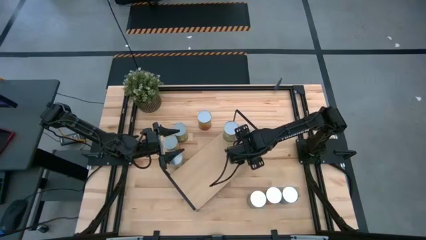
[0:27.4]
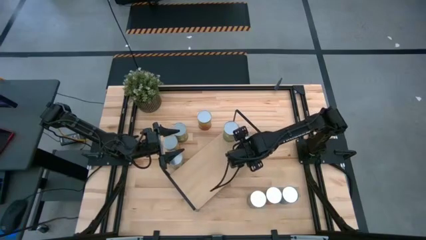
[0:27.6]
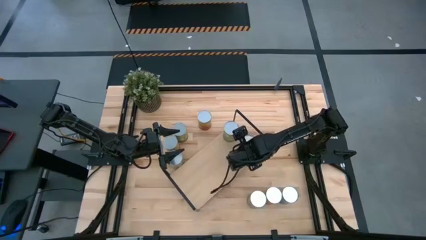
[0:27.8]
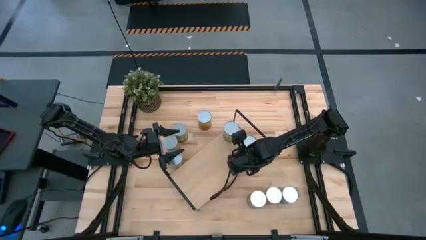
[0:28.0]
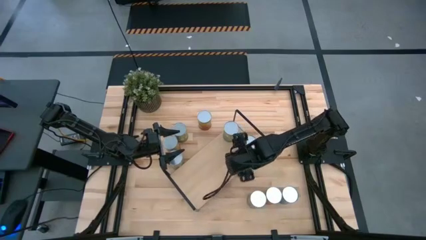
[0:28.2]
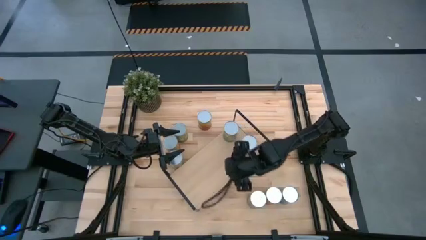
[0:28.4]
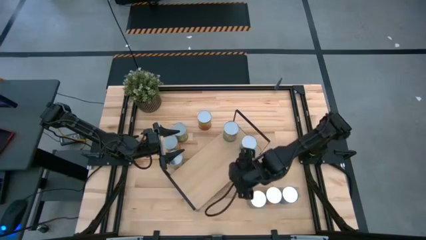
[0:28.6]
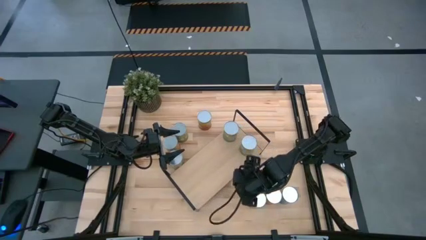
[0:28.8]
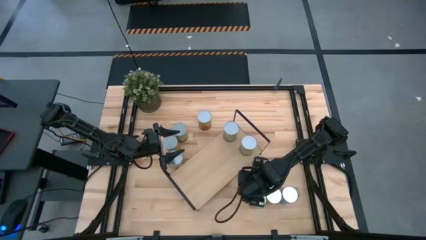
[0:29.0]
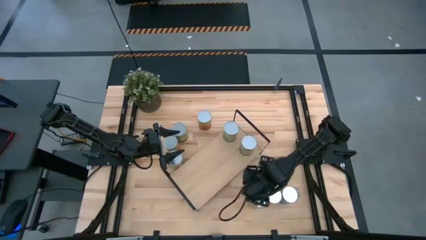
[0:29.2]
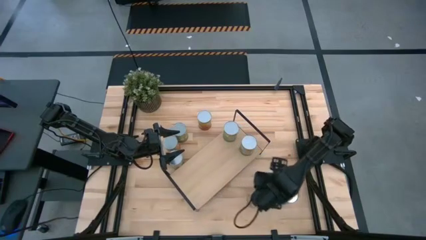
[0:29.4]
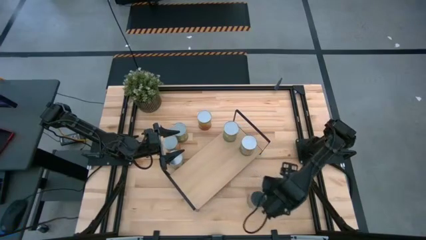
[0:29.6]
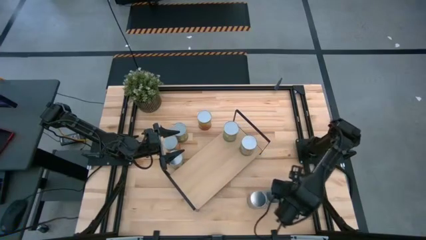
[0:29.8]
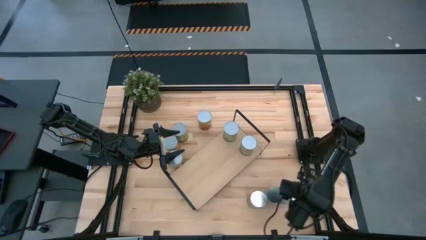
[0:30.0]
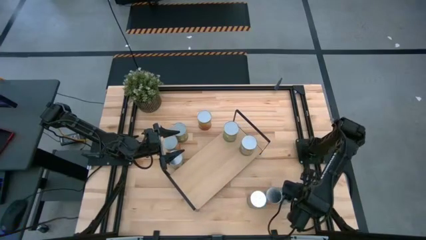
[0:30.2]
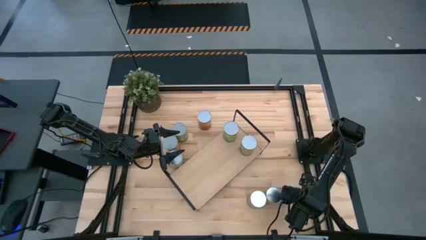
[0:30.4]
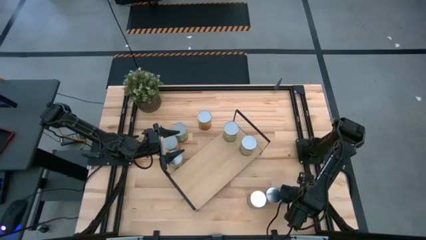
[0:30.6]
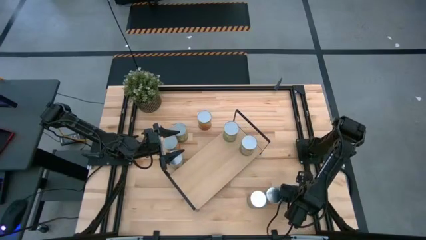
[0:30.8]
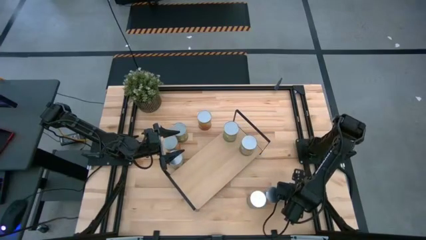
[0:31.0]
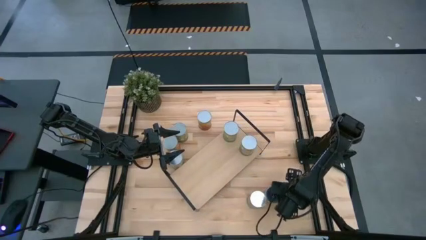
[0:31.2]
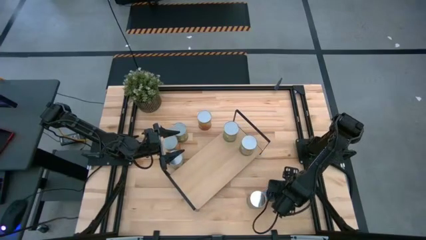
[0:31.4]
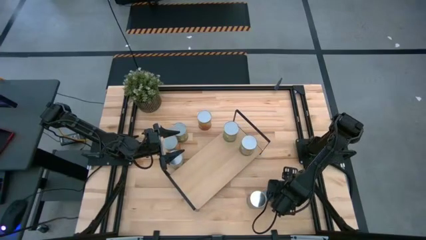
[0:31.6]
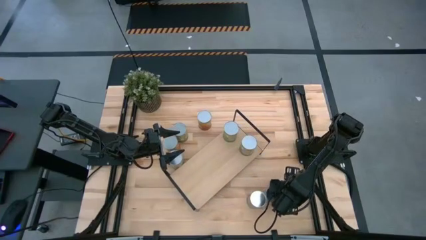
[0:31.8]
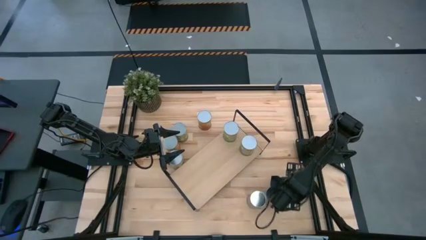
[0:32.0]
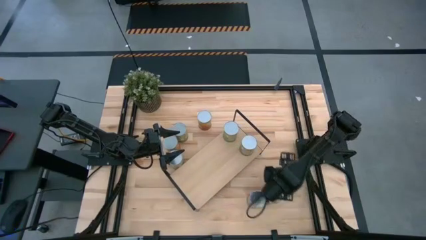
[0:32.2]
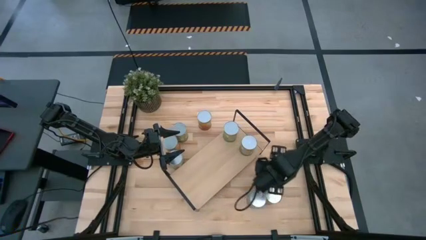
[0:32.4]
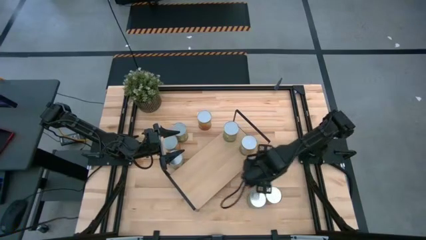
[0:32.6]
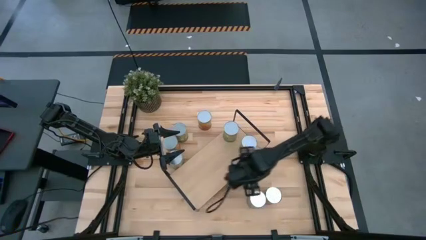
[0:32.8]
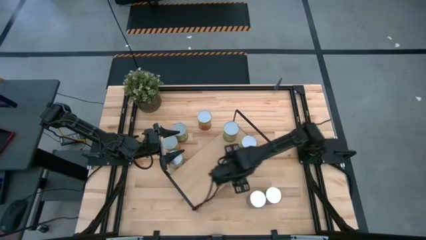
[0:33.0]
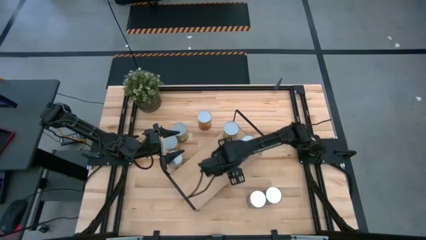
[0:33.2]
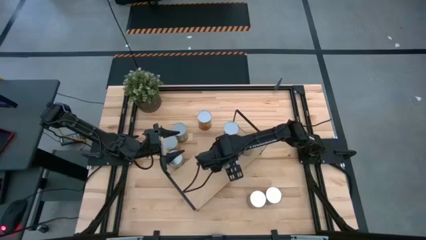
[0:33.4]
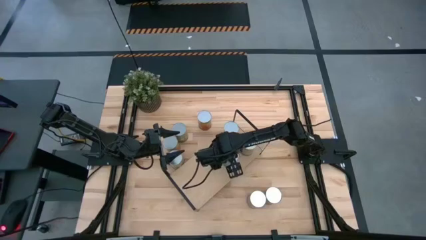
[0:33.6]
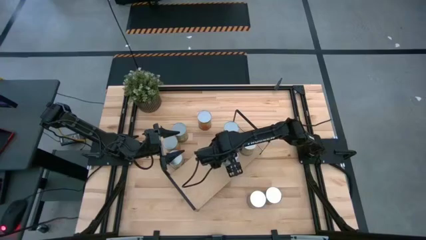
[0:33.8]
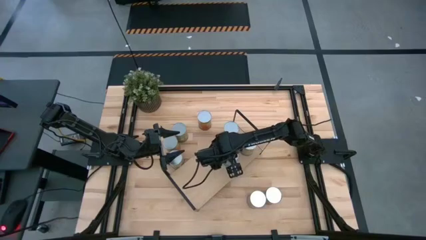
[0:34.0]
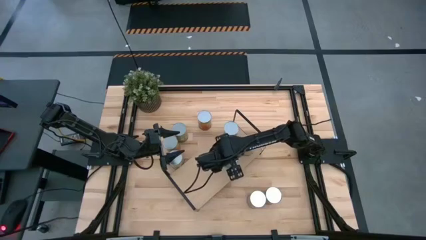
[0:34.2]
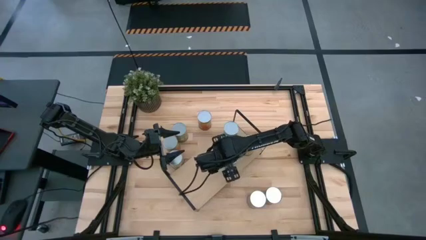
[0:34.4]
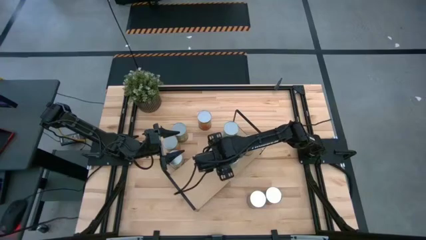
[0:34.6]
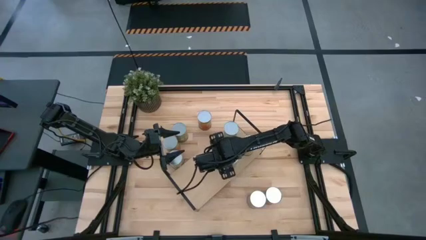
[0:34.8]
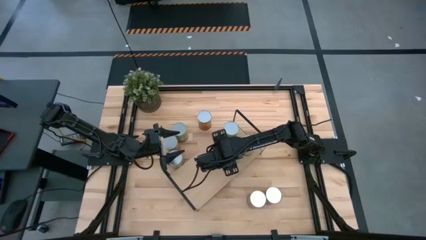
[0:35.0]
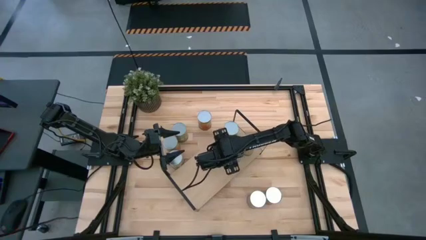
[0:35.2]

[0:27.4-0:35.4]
Task: Pick and place cans onto a shelf
Put the canned cherries on the shelf

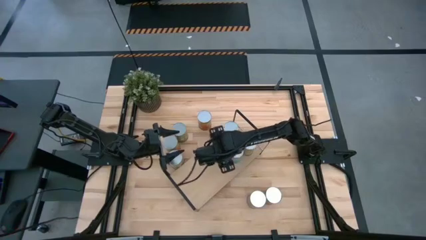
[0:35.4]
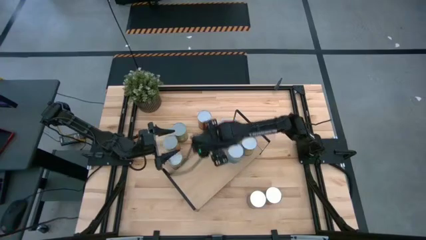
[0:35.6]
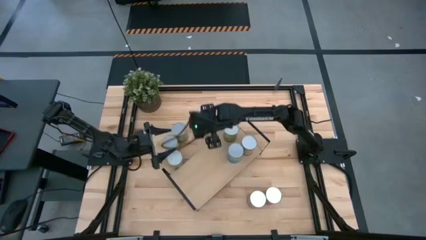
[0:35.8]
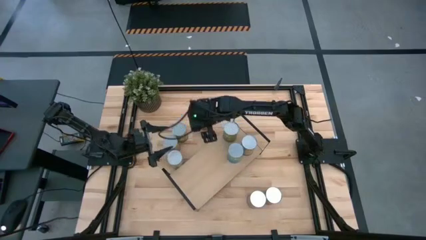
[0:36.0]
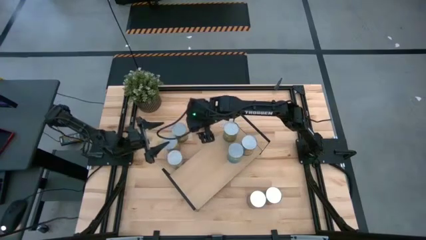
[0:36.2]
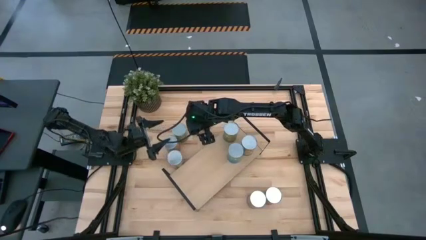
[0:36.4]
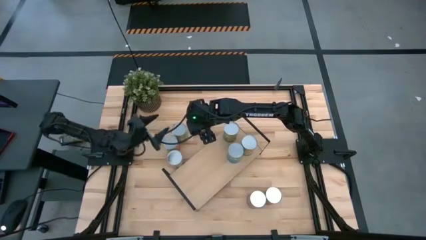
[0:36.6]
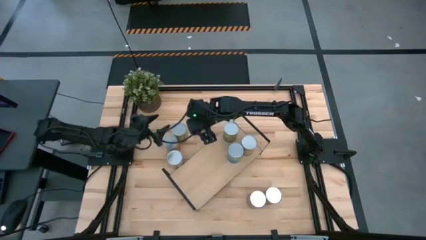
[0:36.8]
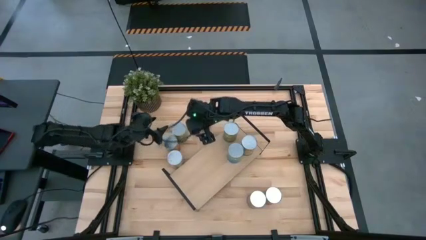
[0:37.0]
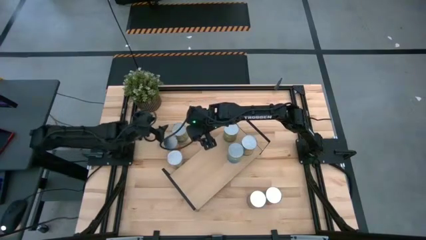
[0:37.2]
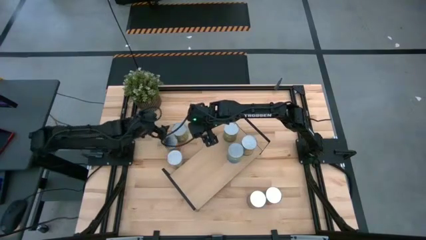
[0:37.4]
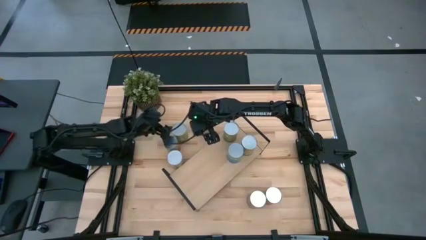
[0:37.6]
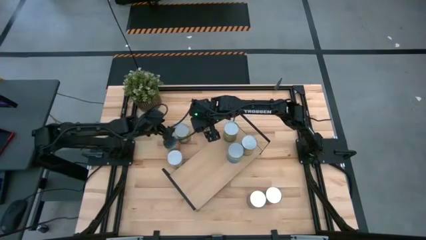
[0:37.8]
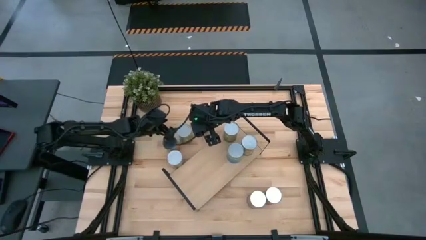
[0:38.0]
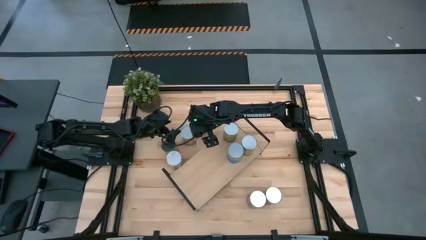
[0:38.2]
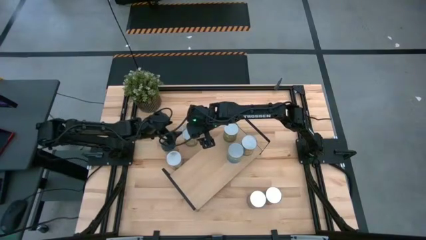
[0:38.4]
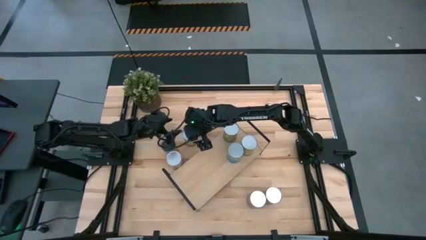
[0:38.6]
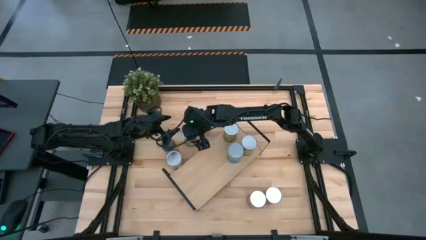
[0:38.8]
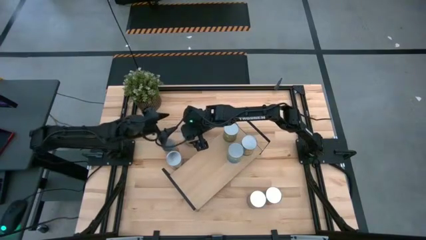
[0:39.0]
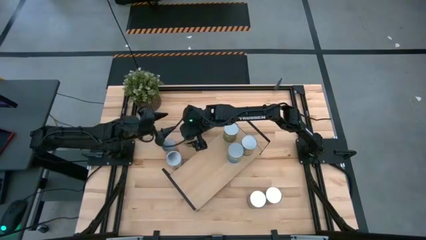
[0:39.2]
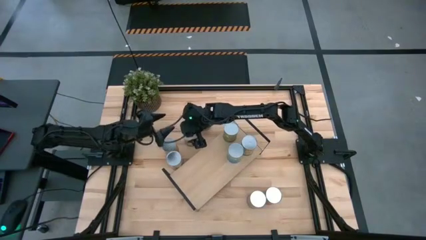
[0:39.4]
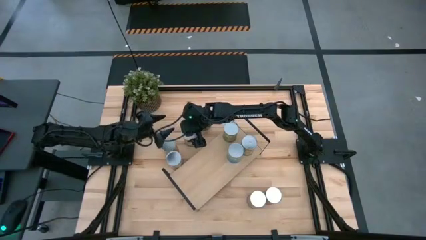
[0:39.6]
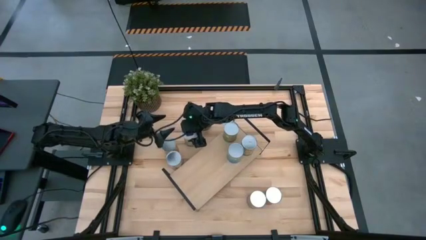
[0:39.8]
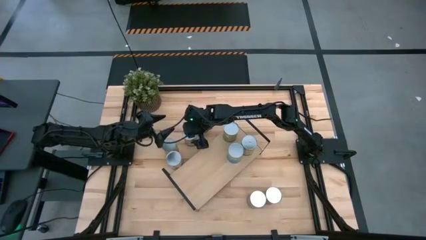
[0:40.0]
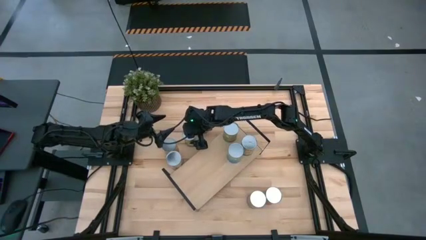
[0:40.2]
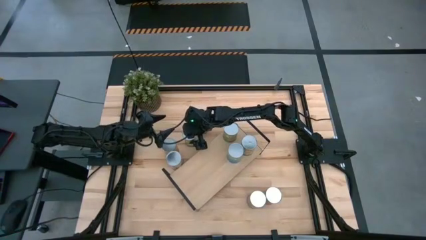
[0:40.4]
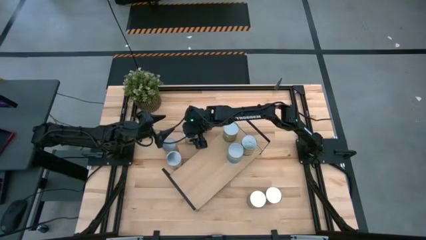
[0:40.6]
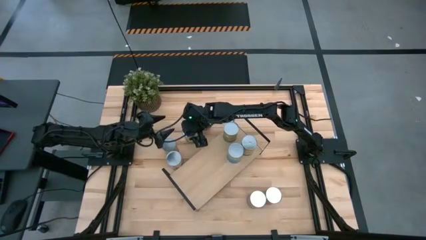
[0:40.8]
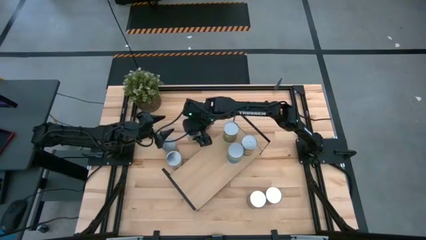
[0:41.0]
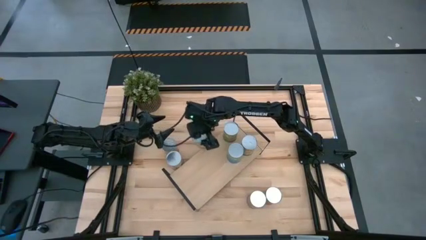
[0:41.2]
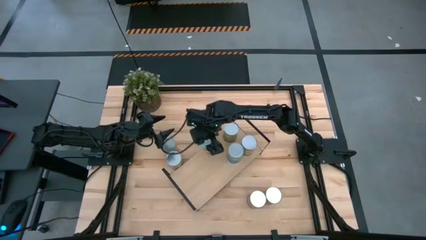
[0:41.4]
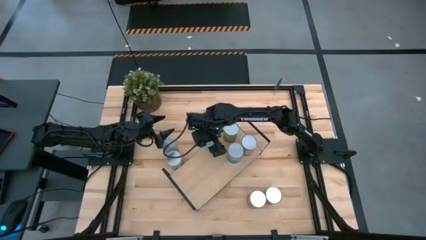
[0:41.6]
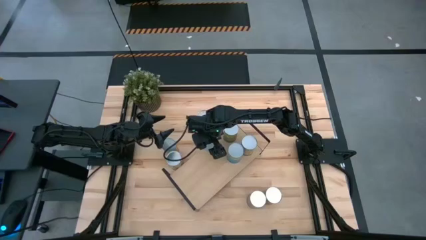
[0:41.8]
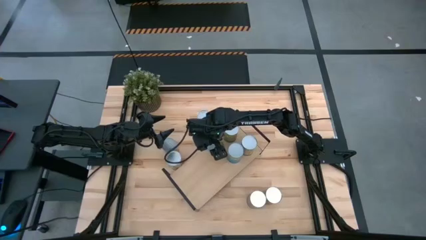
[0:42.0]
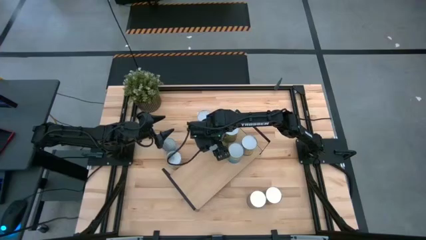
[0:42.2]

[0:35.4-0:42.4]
Put the canned peaches on the shelf

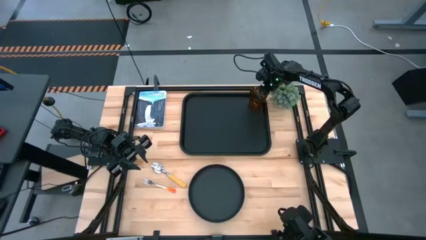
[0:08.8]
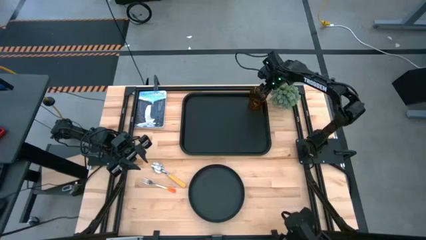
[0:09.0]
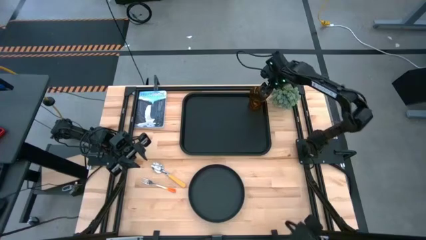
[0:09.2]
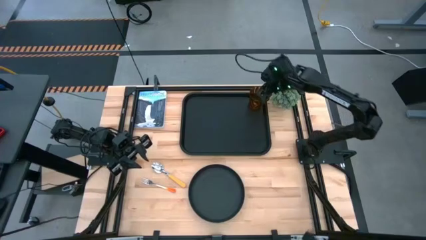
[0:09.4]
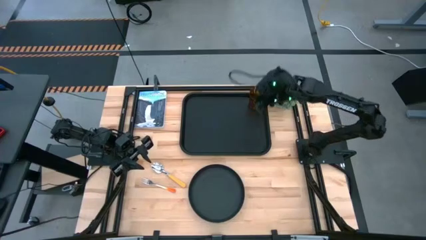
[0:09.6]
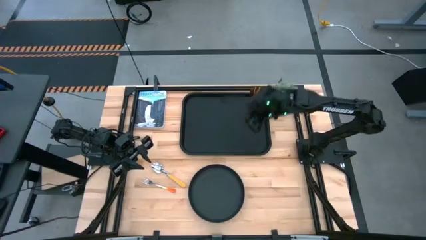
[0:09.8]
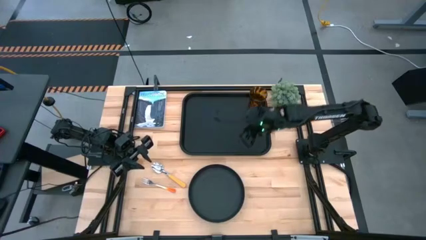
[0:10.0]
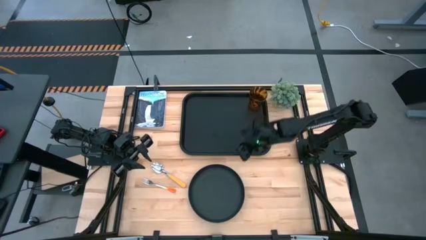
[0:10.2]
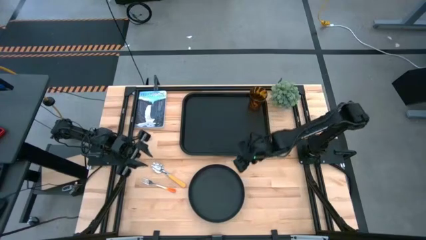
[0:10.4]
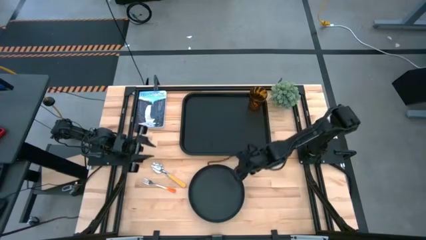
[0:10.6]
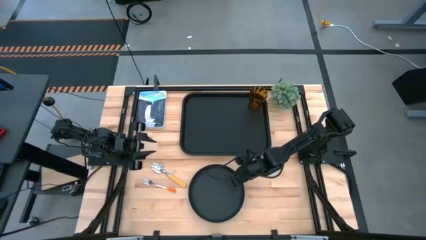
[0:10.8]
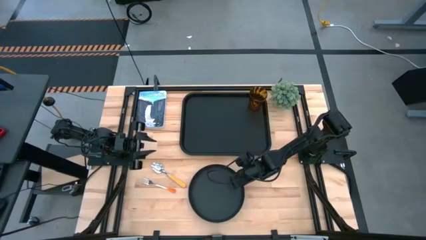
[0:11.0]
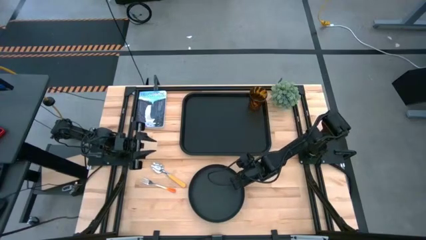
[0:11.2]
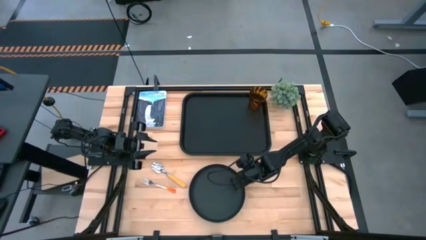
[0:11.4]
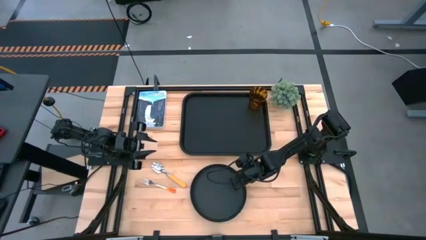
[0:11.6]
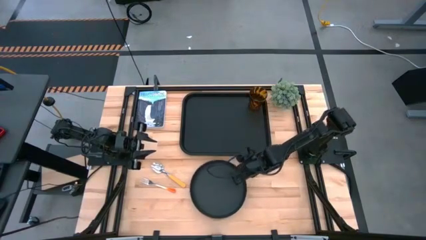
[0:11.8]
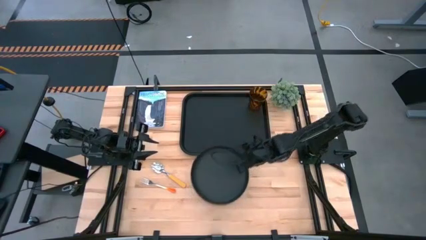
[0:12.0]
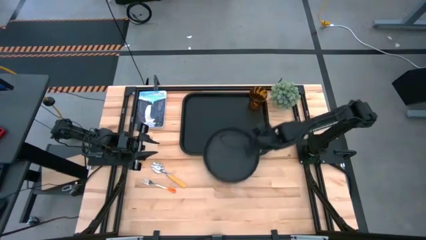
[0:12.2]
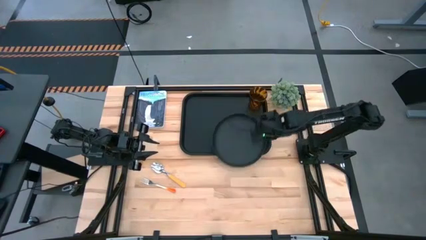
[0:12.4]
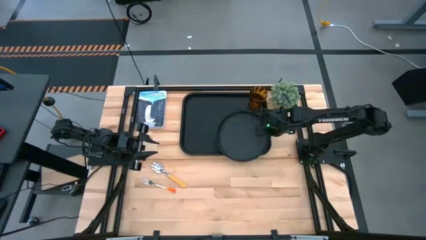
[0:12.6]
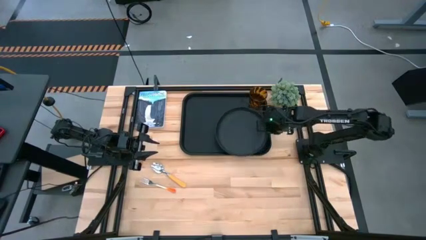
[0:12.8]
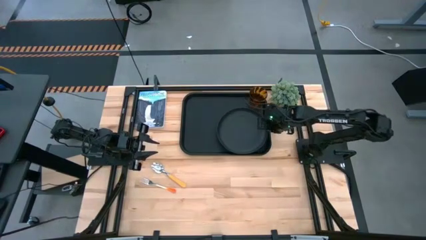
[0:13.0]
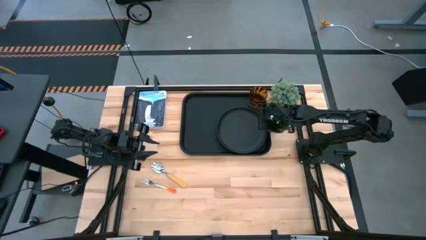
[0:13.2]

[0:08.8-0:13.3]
Task: Pick and place plate/cup/fork/spoon on tray
Put the black plate on the black tray to the bottom of the brown cup
